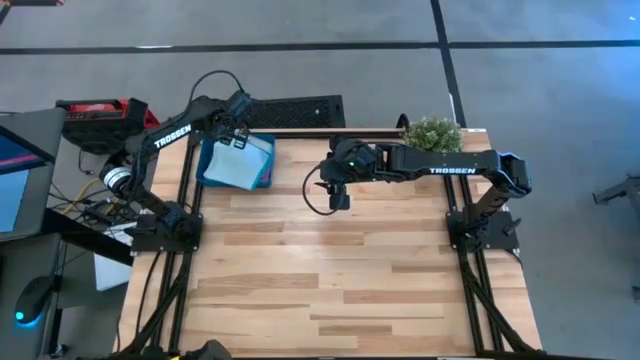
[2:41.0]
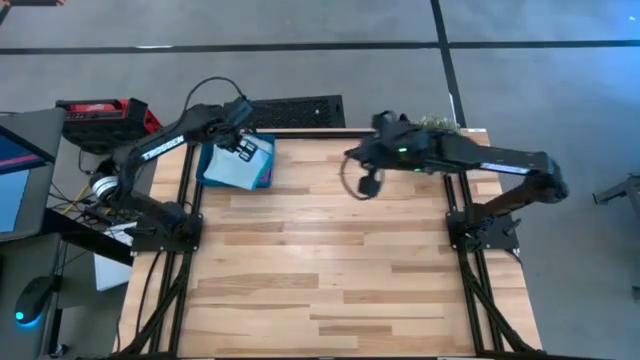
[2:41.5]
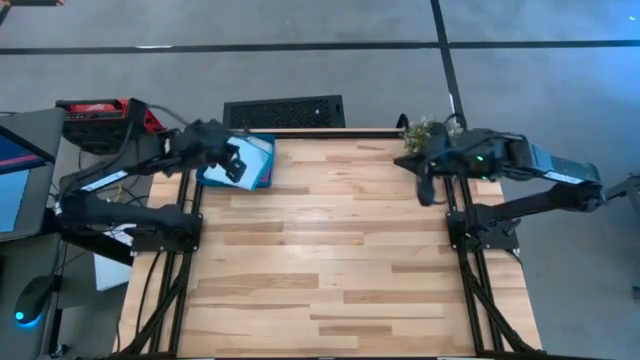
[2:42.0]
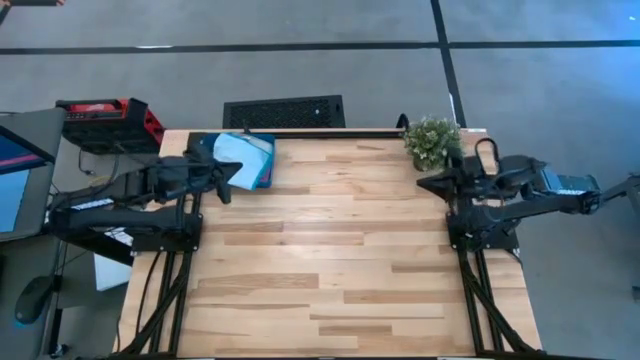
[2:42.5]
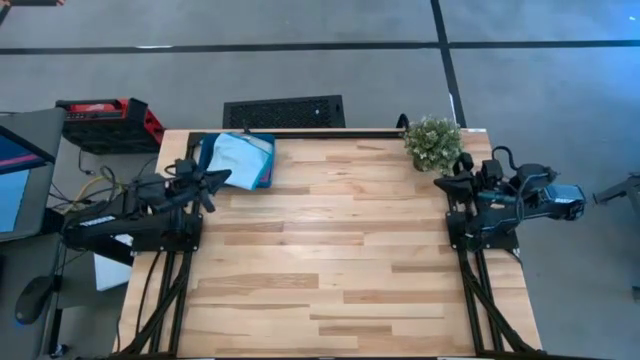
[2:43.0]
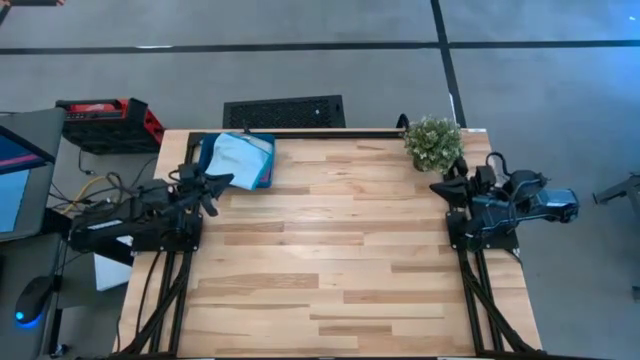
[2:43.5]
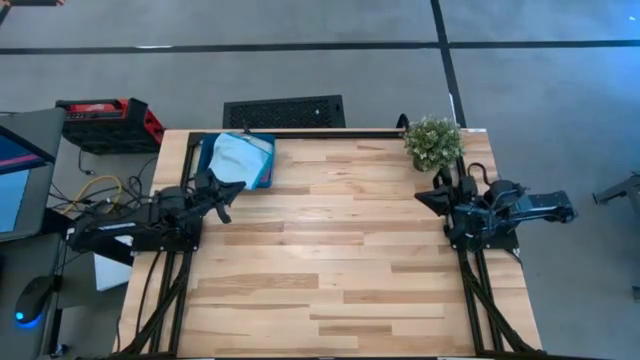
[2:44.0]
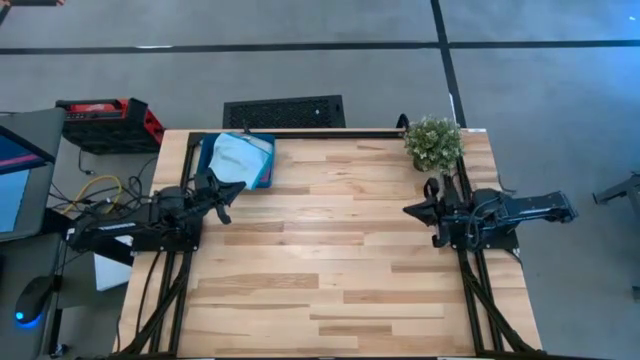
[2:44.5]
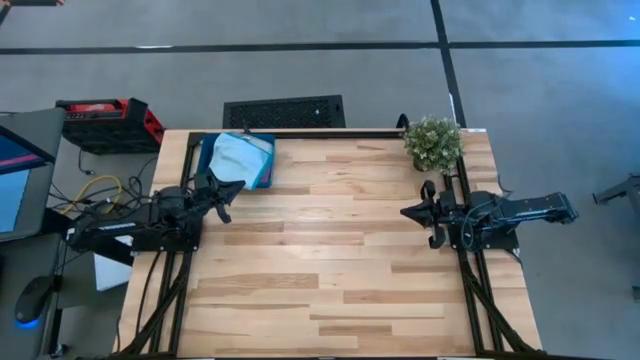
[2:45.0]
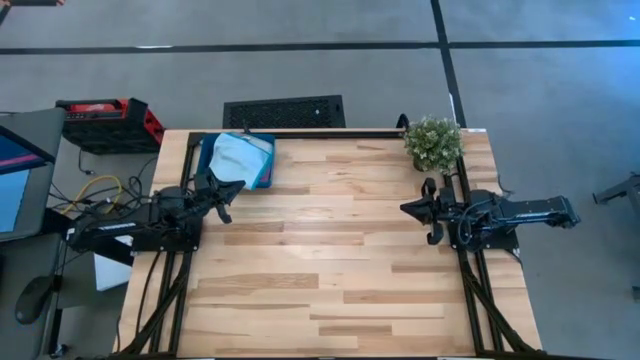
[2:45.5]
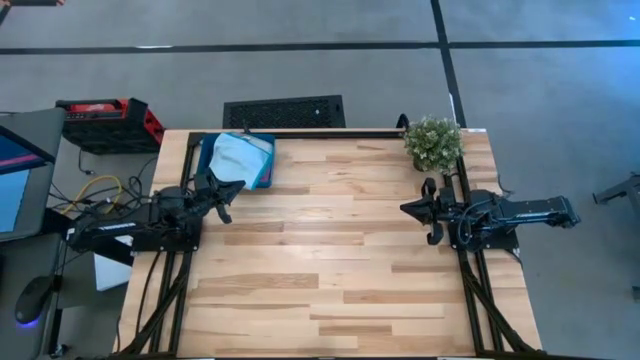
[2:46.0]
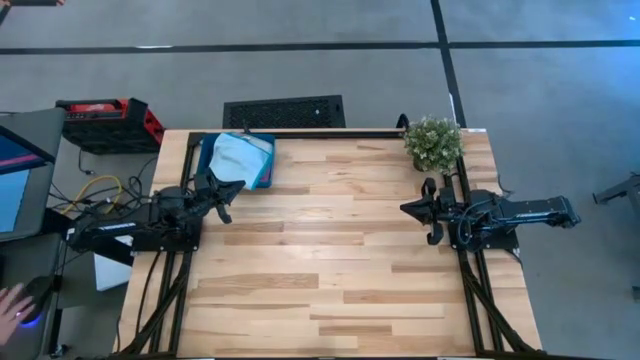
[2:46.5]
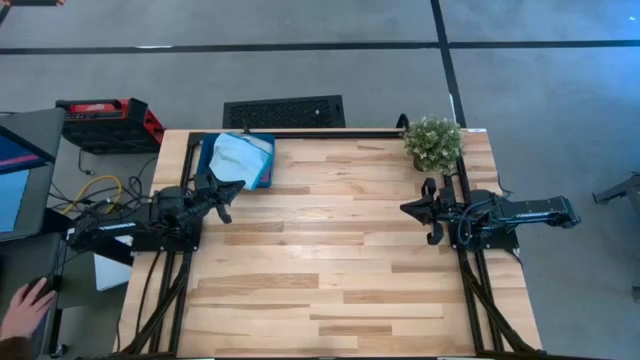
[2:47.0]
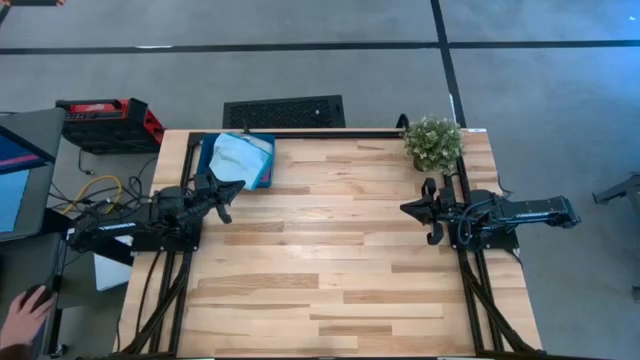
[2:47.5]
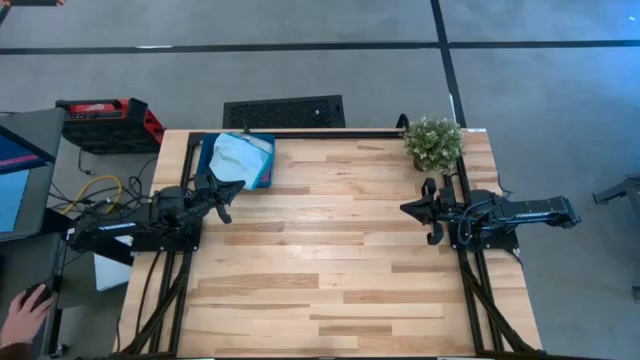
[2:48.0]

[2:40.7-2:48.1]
Task: Fold microfiber towels
Return to Home Position

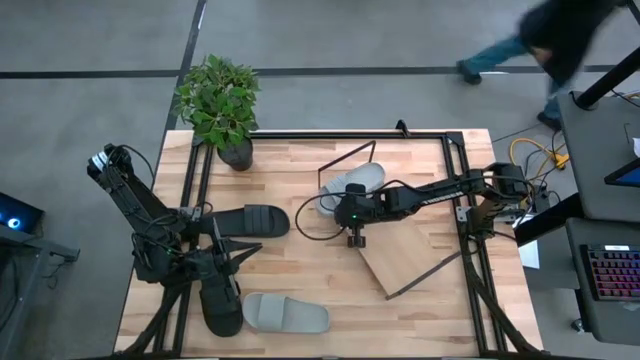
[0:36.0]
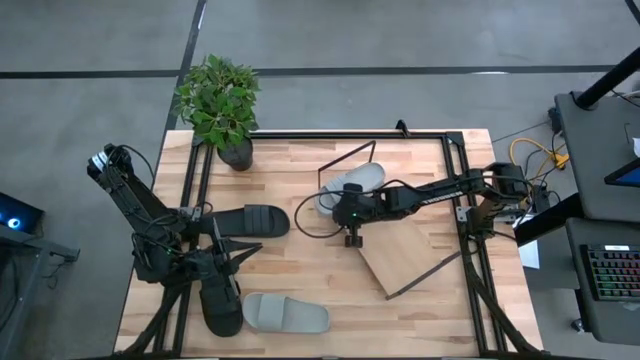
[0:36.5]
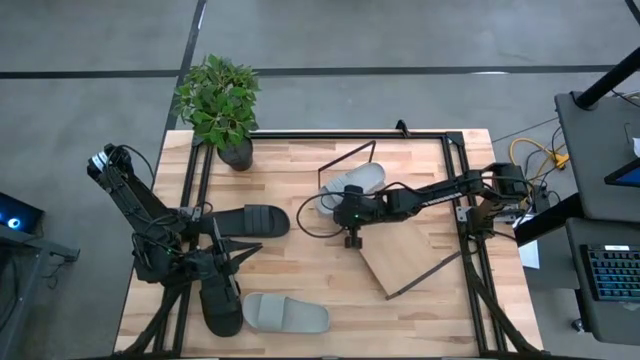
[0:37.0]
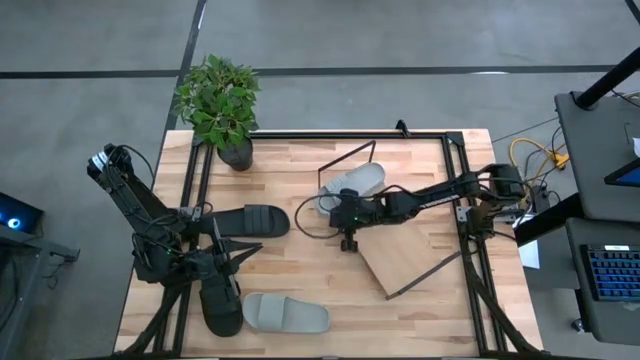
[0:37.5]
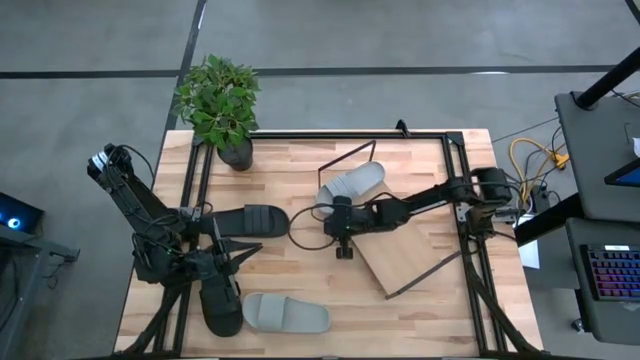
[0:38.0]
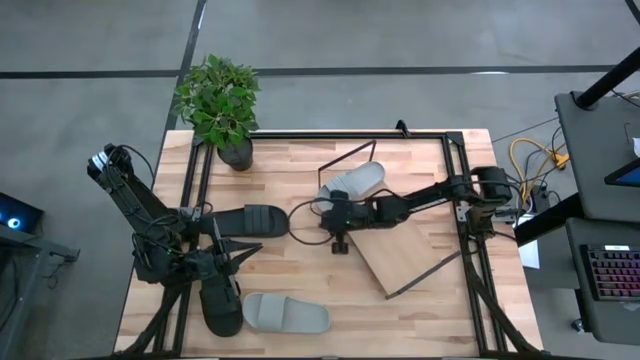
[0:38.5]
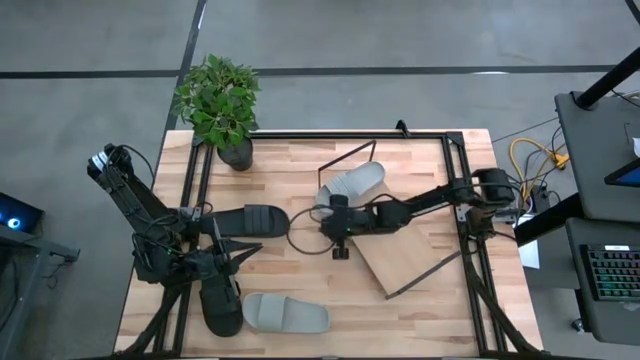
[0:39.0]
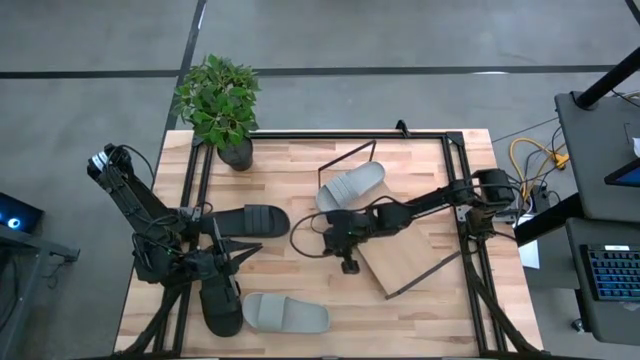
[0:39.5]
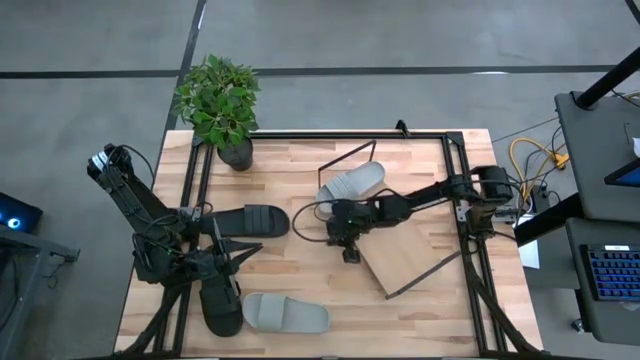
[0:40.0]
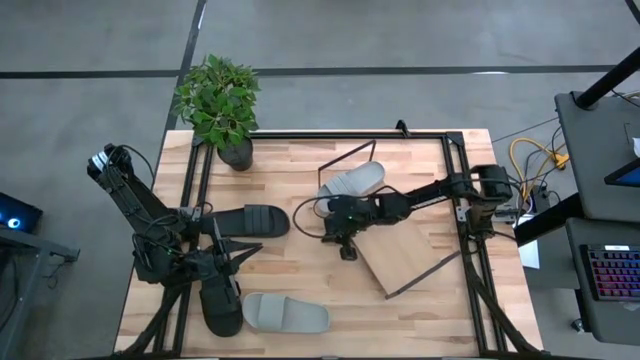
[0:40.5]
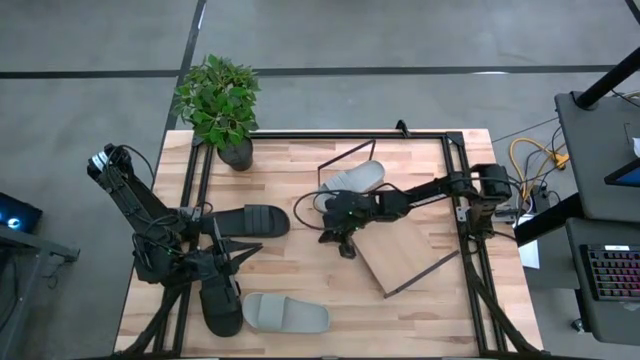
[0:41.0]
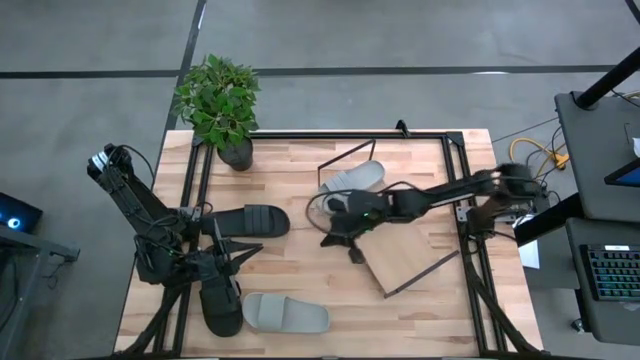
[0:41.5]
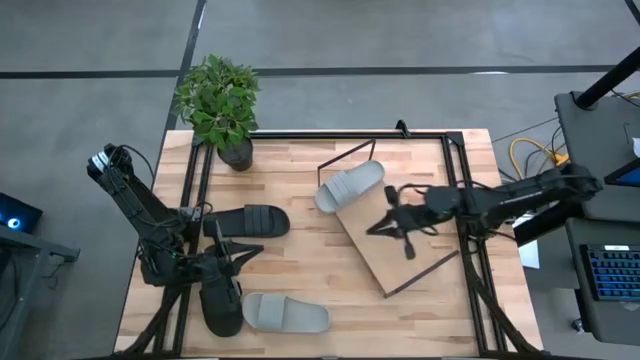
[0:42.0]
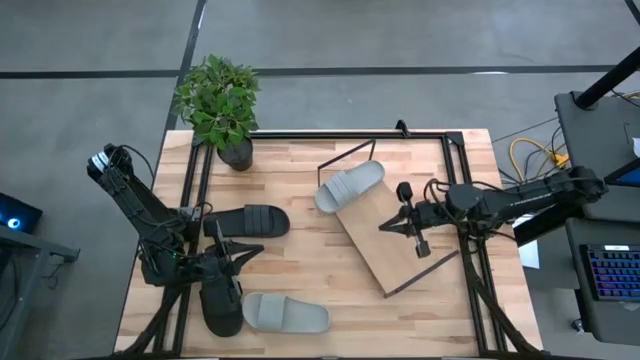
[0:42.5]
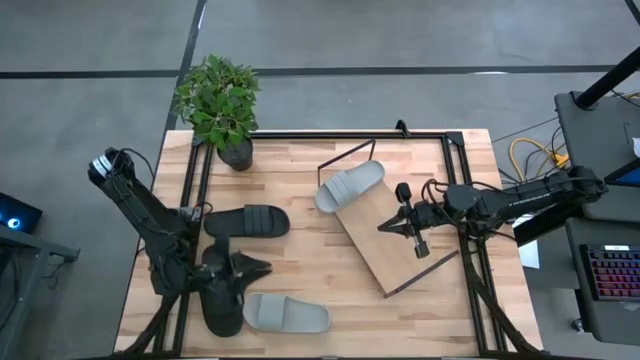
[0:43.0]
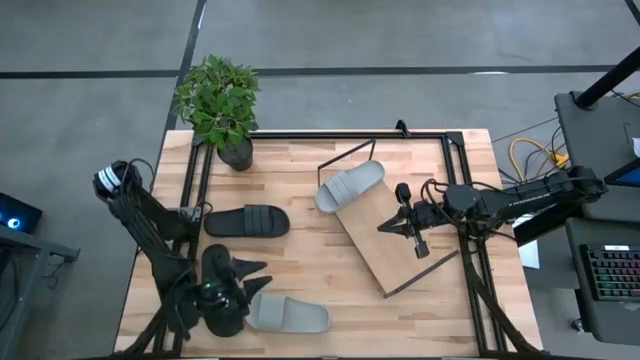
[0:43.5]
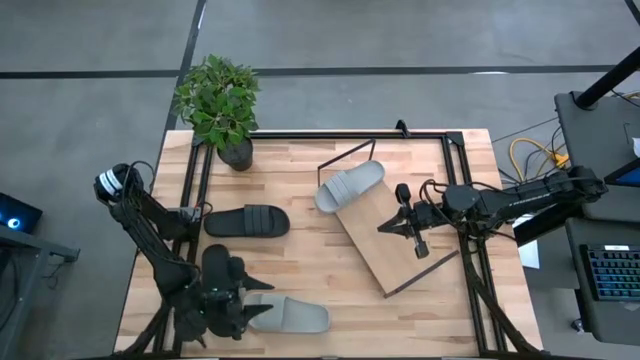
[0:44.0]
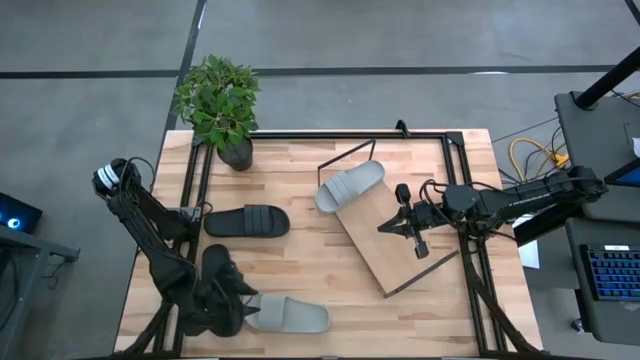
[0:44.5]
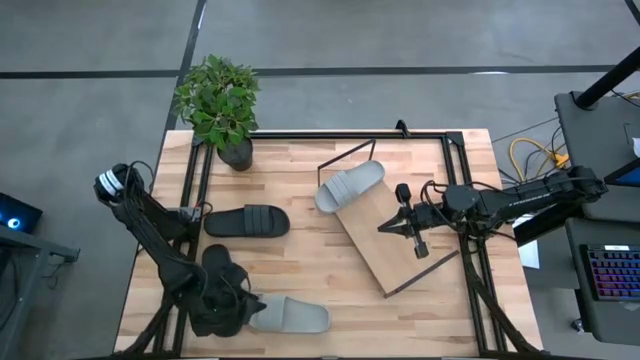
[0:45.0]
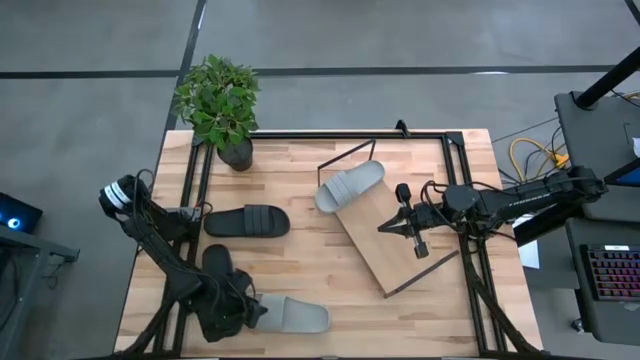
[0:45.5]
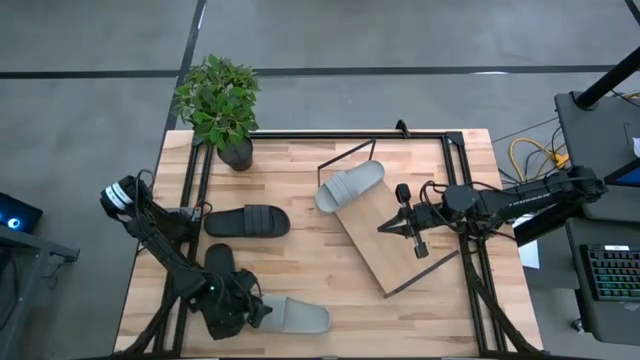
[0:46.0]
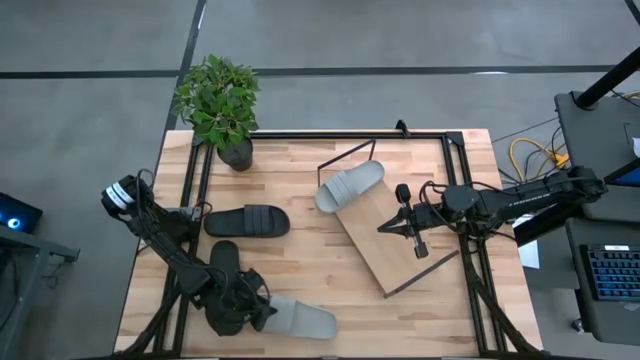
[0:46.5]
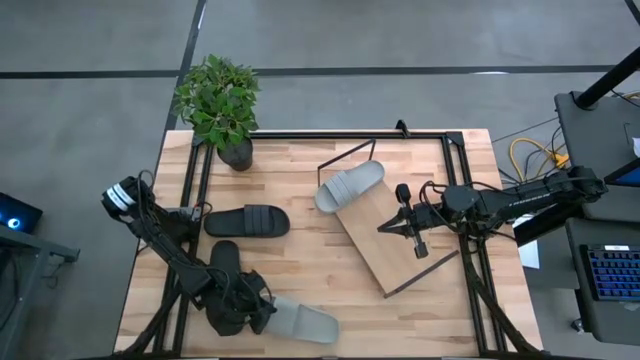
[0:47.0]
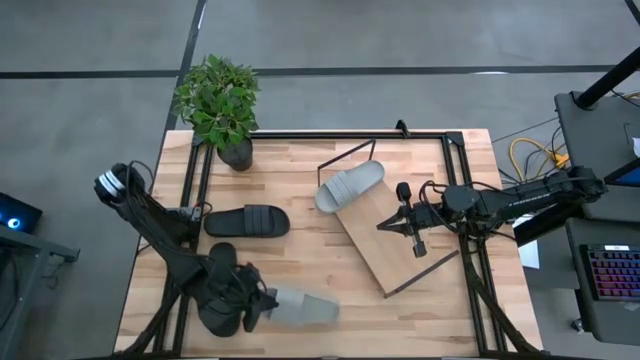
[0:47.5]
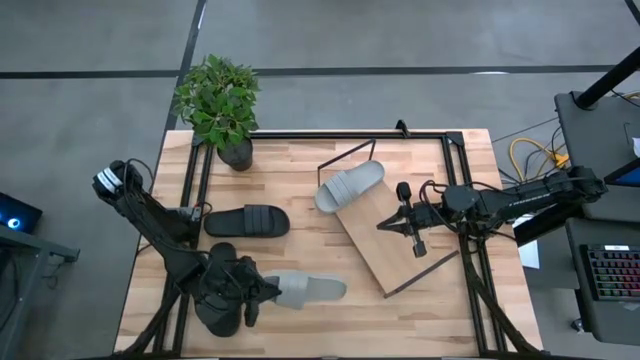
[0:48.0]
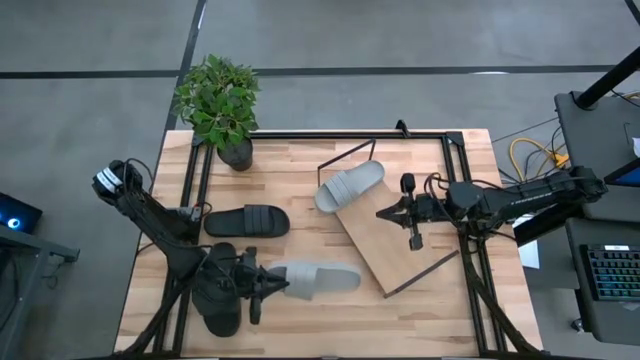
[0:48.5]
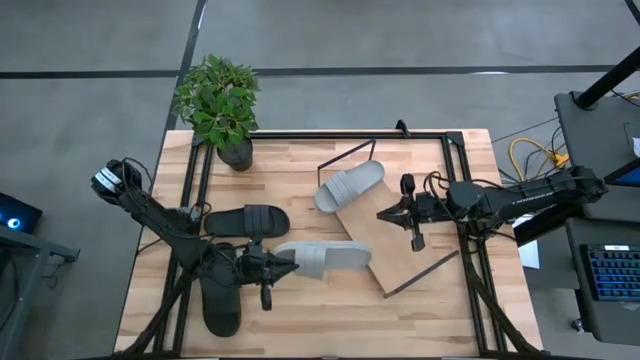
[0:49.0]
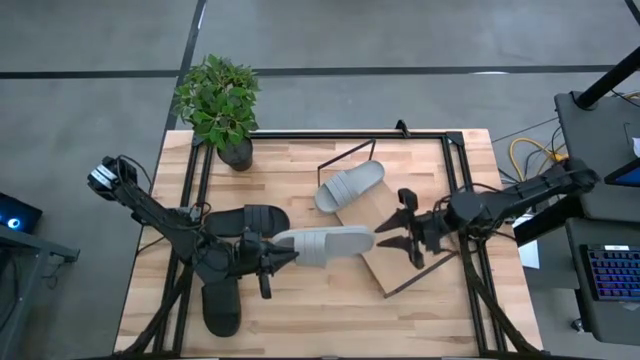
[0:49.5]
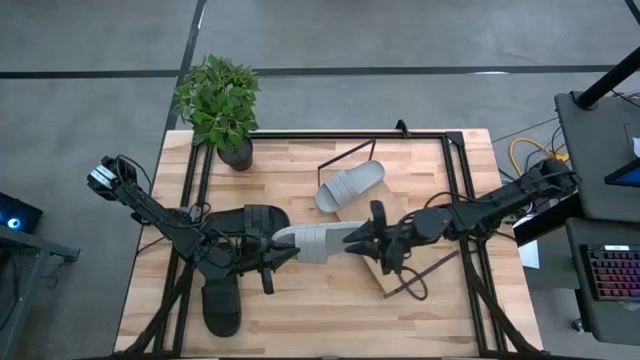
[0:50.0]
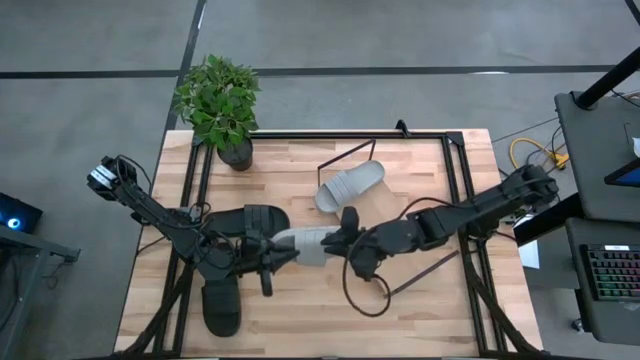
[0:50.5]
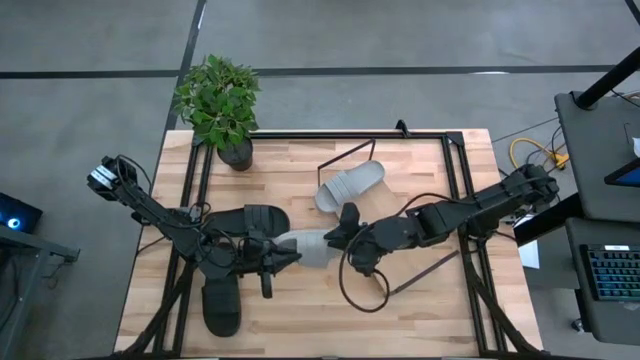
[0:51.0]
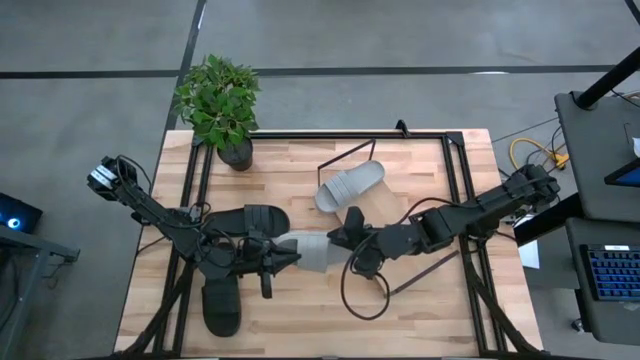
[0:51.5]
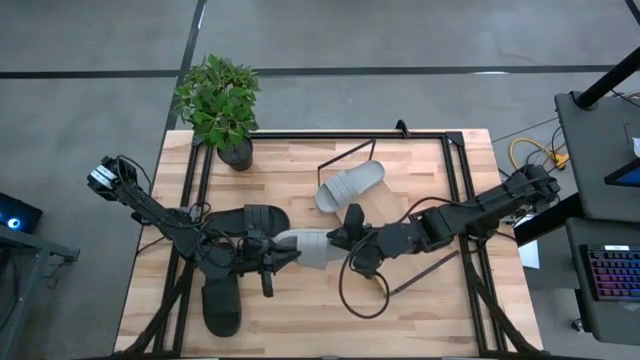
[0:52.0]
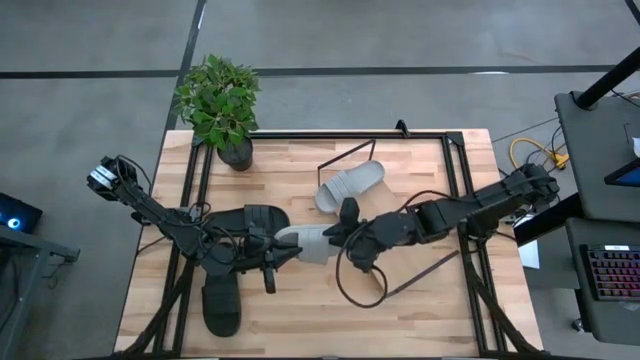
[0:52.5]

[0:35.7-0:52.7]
Task: Pick and place slides into the shelf
Put the gray slide on the shelf
